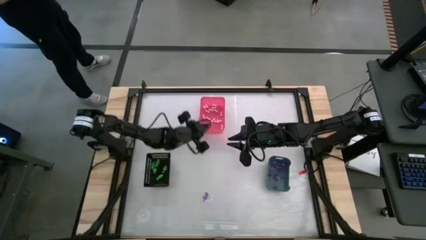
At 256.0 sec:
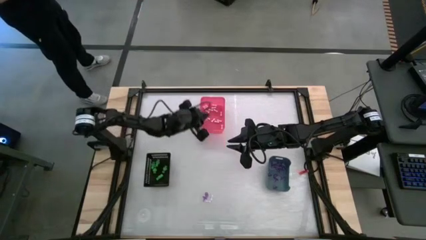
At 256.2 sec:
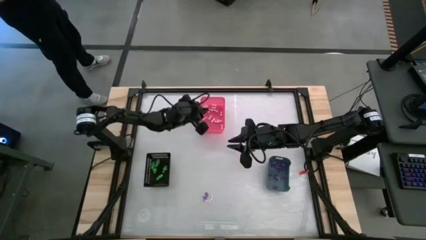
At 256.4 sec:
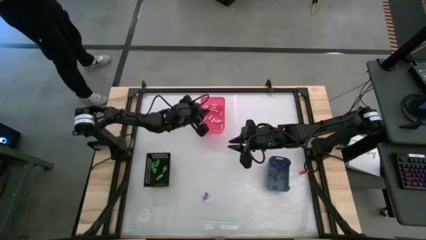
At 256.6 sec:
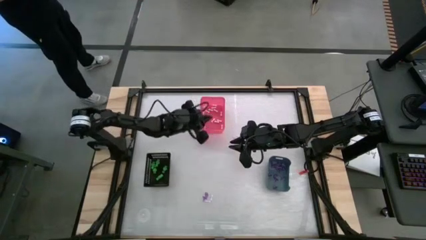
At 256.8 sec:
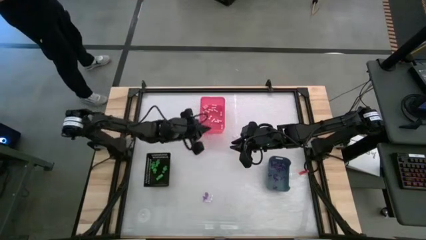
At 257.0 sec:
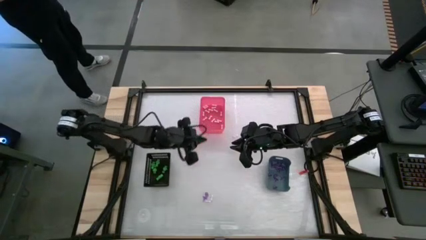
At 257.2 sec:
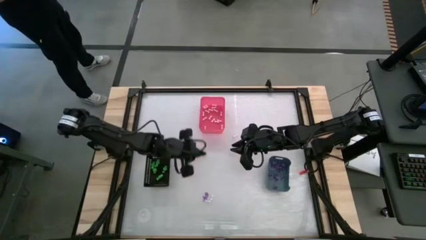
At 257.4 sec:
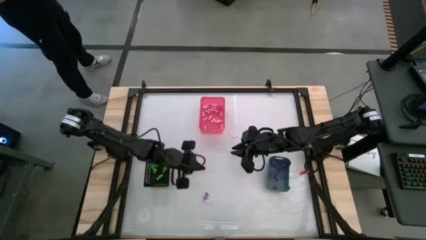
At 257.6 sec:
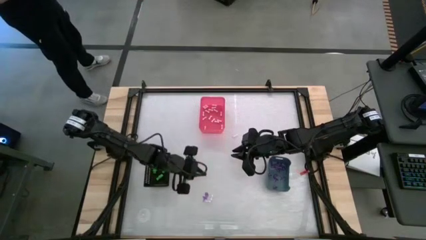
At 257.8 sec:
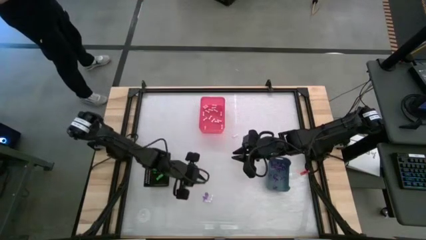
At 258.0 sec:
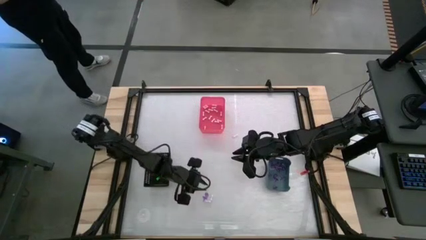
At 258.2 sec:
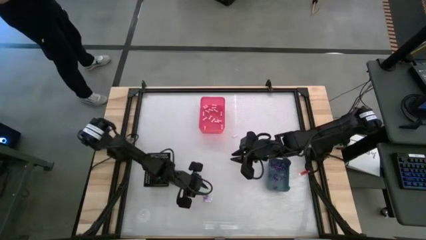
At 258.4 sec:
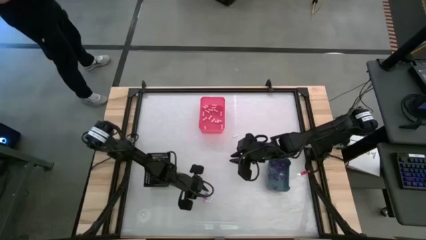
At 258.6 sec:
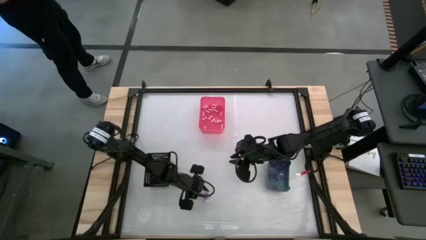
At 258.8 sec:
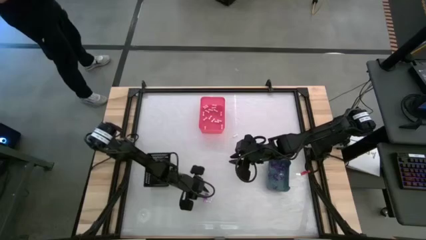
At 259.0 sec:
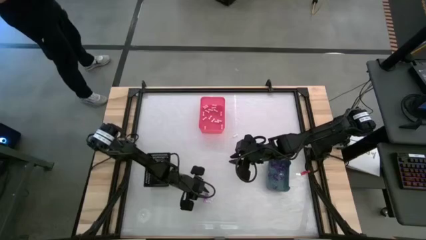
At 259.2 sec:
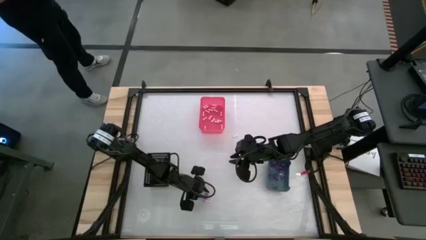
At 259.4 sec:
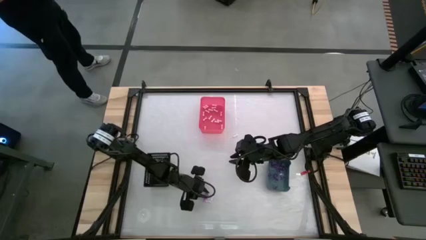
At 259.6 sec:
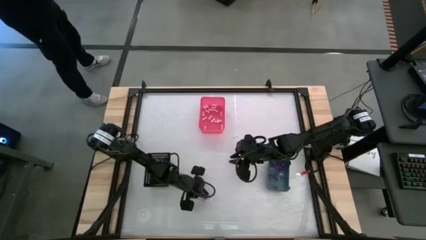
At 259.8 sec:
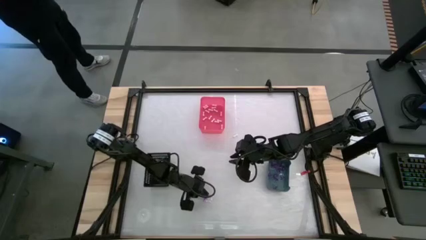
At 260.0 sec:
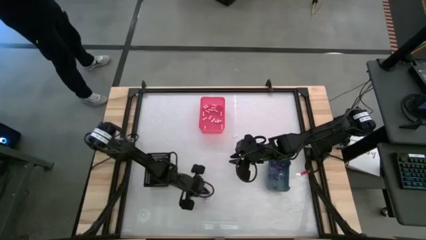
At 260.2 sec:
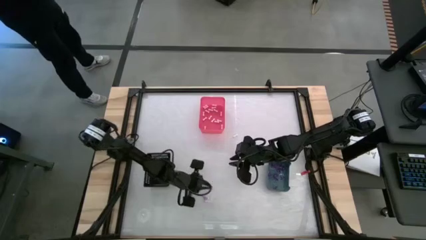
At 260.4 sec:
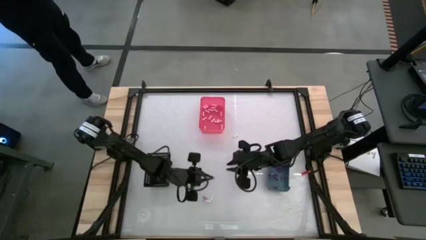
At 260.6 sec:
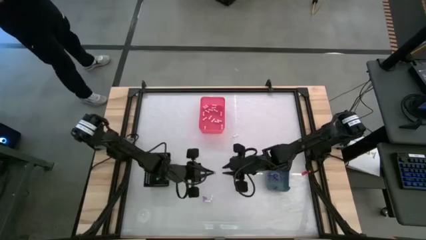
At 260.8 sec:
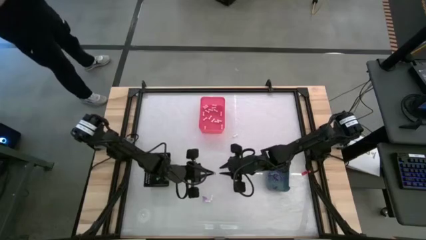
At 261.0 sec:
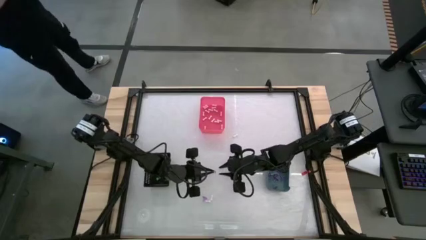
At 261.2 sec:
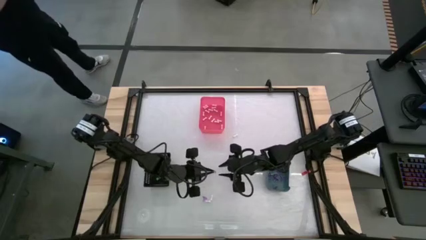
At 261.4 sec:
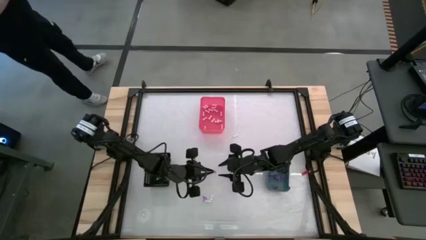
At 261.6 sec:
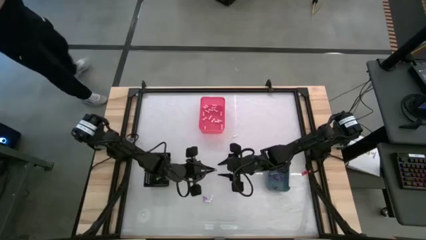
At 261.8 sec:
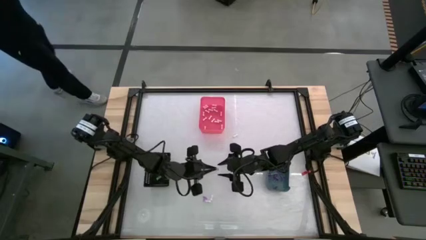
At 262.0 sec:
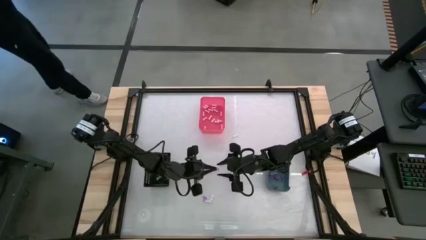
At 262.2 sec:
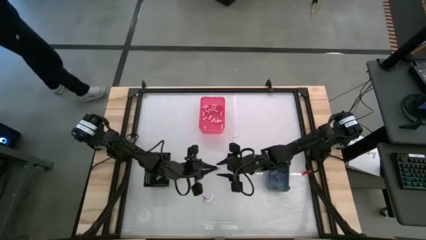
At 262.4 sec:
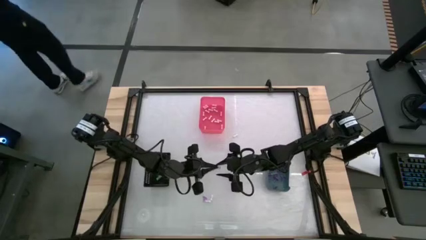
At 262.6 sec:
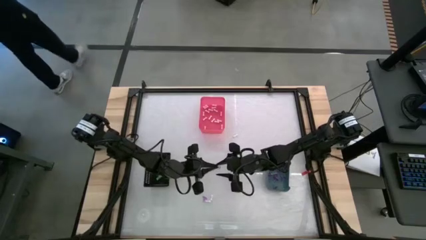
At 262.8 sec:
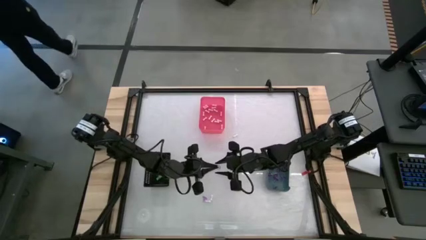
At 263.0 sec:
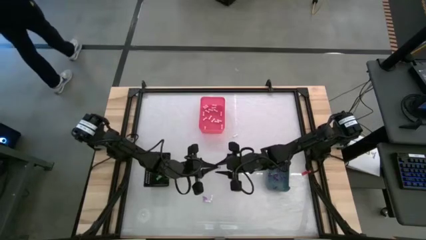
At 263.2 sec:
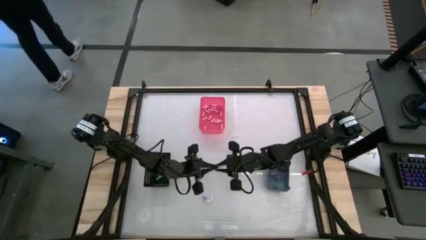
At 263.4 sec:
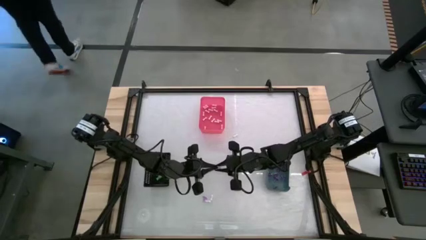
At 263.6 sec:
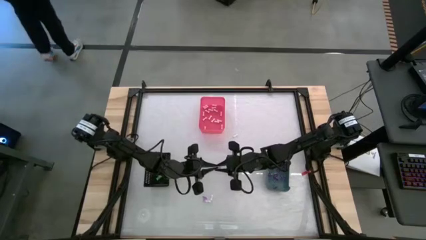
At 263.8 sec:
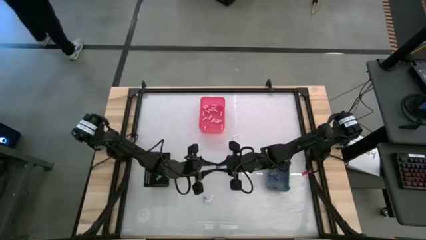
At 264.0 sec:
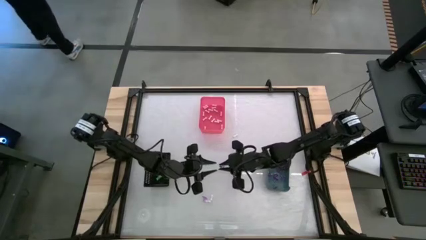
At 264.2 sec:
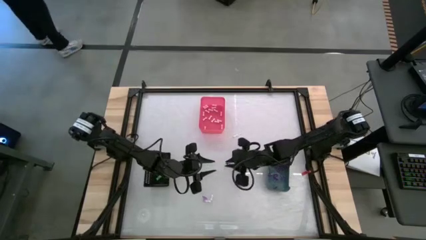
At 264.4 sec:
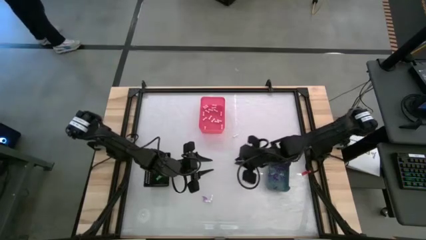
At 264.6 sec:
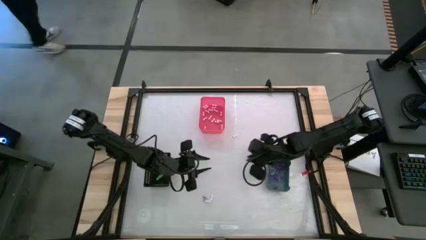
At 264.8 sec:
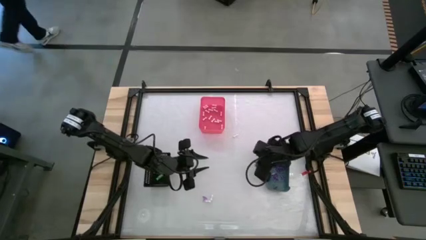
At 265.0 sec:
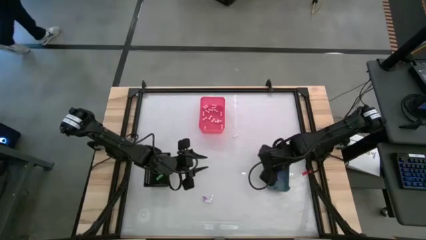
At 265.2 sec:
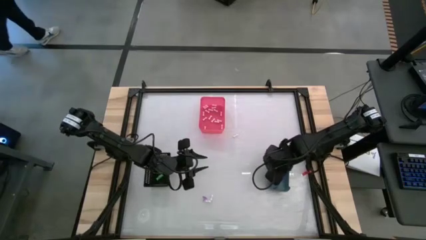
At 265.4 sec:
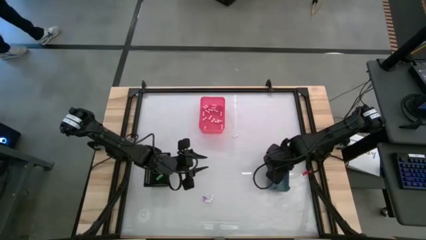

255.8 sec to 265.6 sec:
Task: Sort Halloween decoration
Put the witch hat toy into the blue bin

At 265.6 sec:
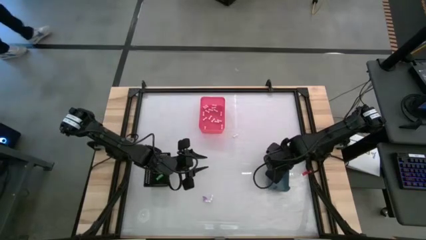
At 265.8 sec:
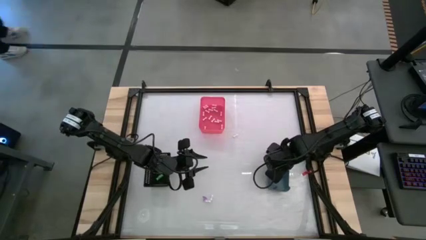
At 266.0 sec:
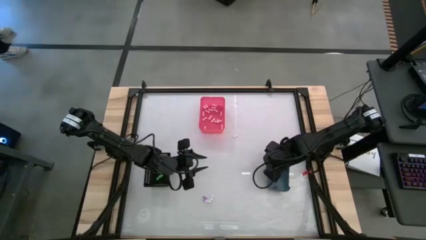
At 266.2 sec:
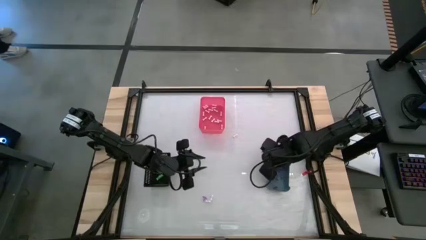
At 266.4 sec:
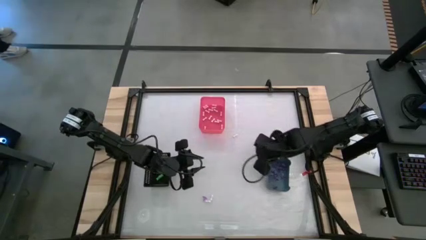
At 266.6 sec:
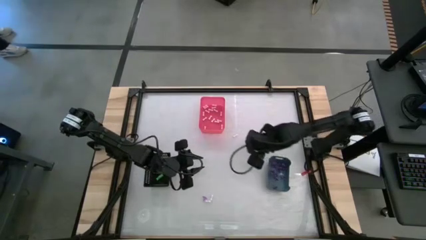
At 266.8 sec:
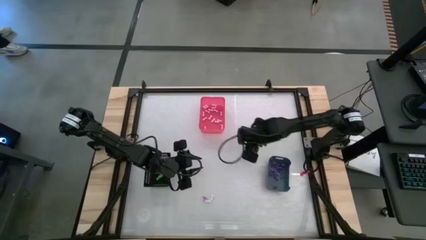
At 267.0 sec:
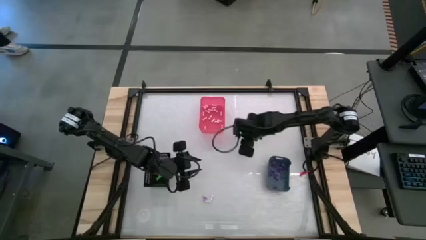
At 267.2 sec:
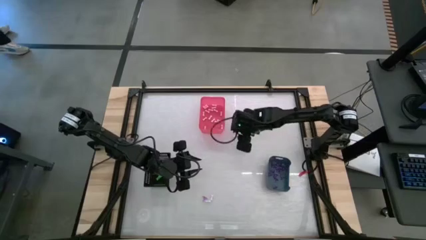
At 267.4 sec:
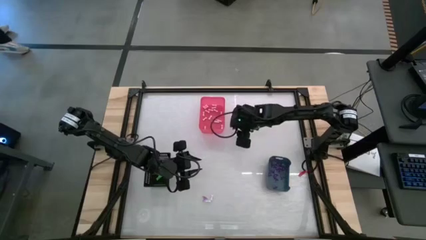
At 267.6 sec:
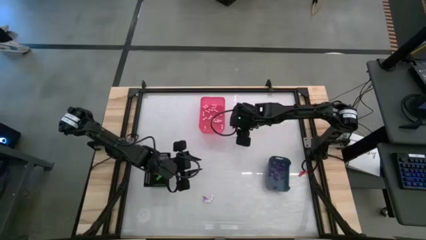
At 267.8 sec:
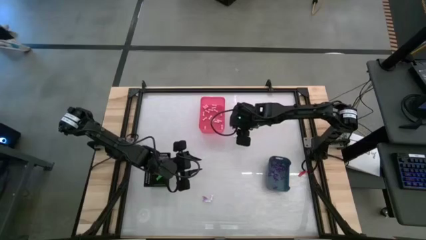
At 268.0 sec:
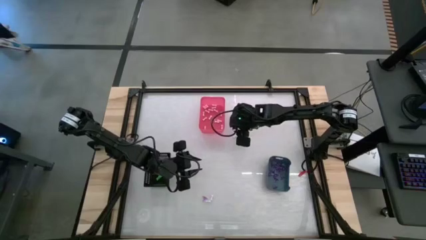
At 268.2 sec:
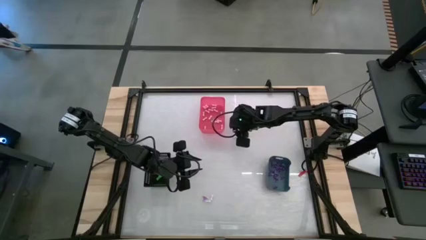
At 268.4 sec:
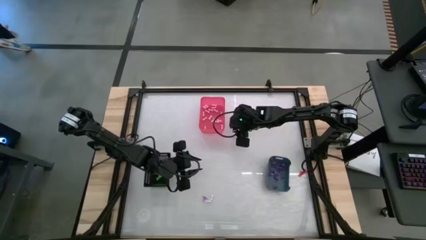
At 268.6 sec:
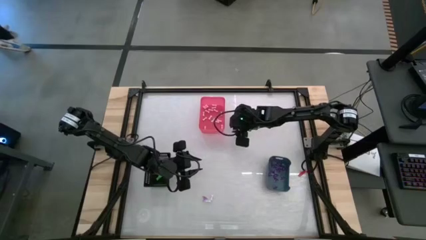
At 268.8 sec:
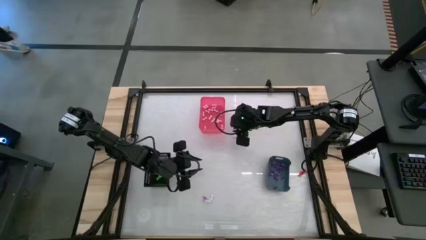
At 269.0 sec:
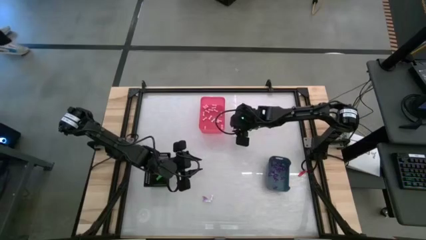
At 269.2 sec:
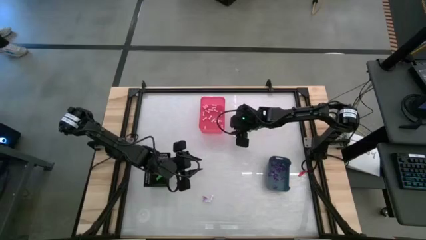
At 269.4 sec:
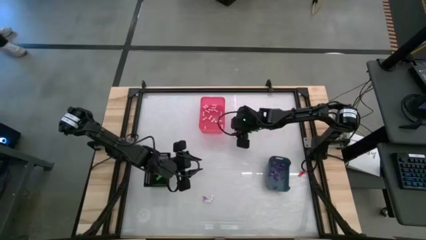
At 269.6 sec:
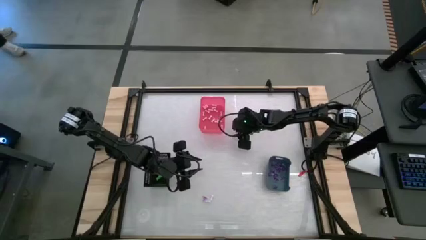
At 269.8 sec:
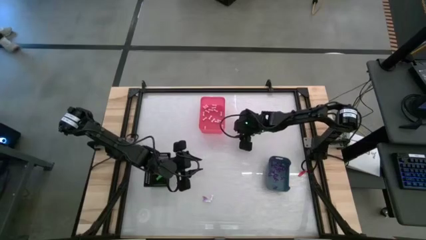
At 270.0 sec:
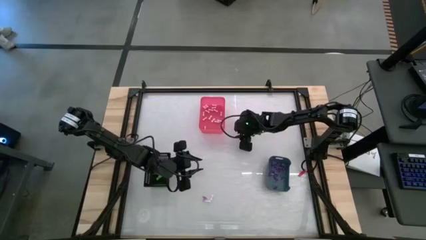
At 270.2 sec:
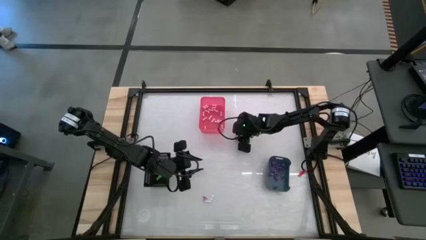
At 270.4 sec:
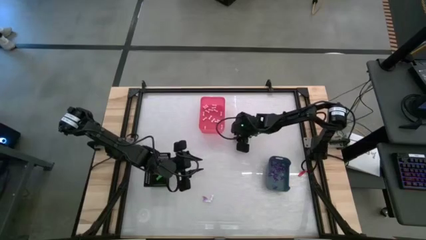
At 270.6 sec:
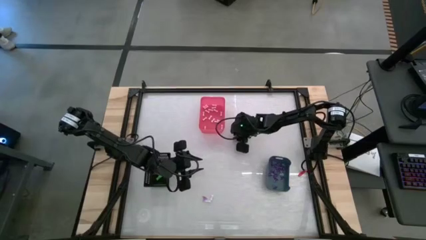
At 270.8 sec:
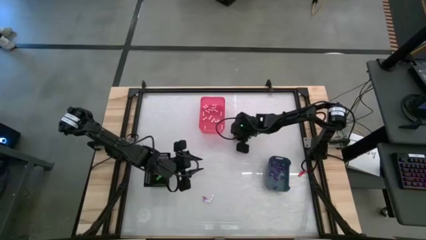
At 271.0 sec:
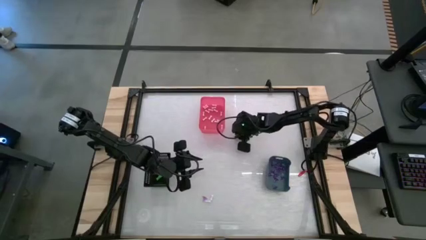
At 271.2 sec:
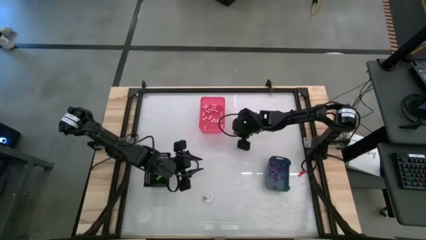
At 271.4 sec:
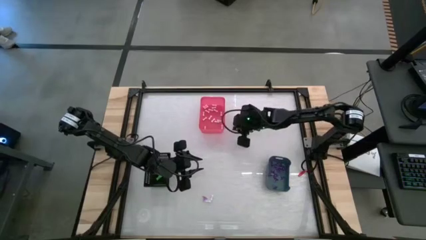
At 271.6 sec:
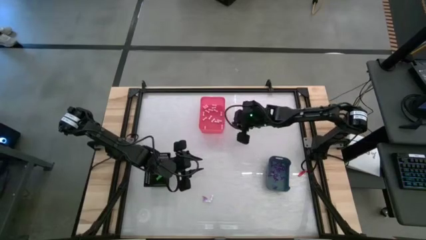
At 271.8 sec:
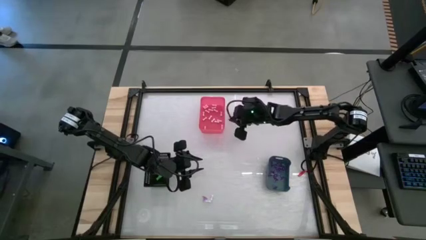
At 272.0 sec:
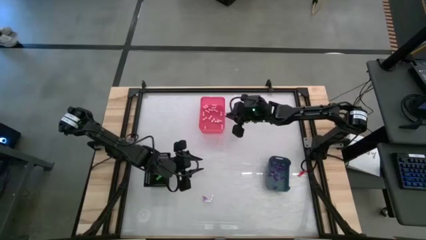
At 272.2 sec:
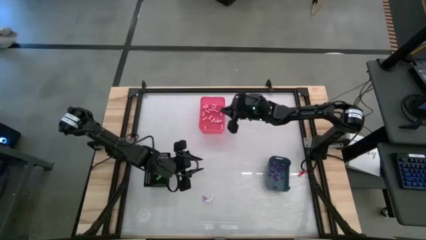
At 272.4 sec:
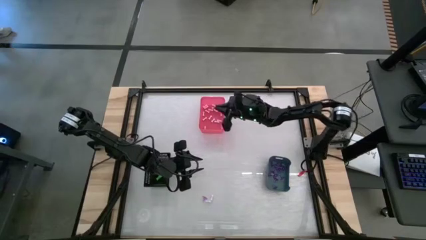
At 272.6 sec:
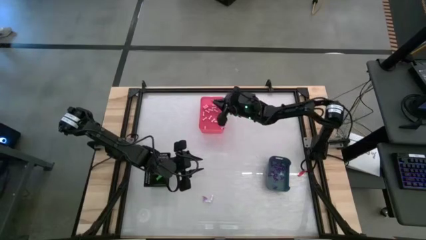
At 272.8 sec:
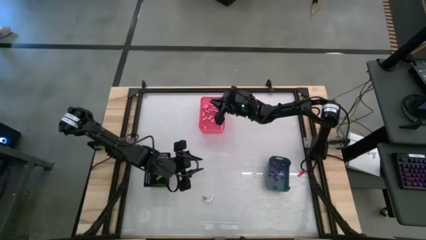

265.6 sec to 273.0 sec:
Put the bone toy into the red bin
